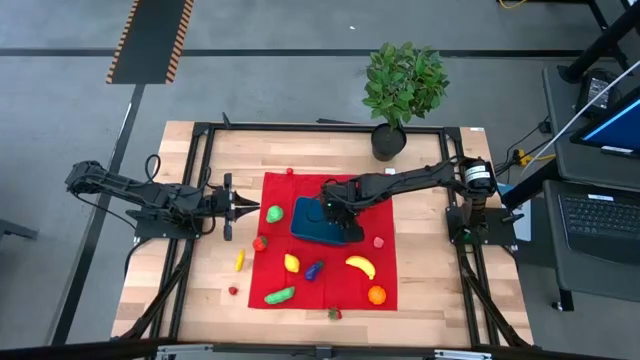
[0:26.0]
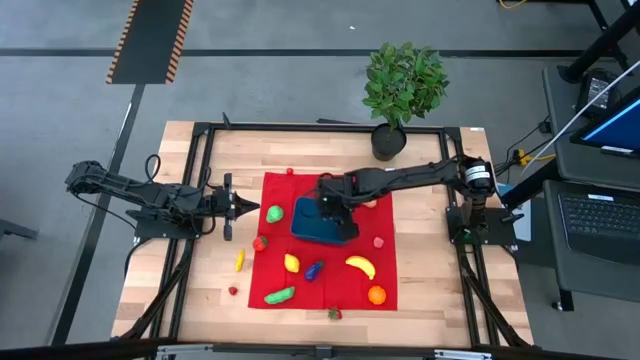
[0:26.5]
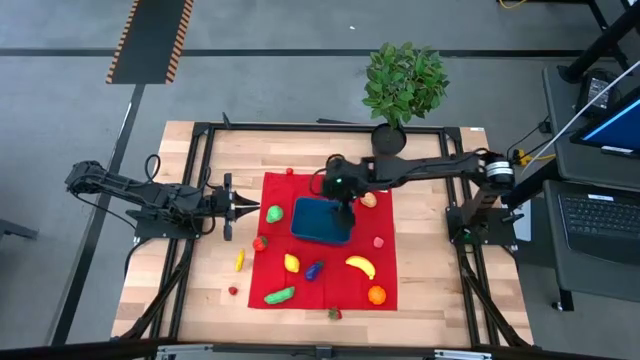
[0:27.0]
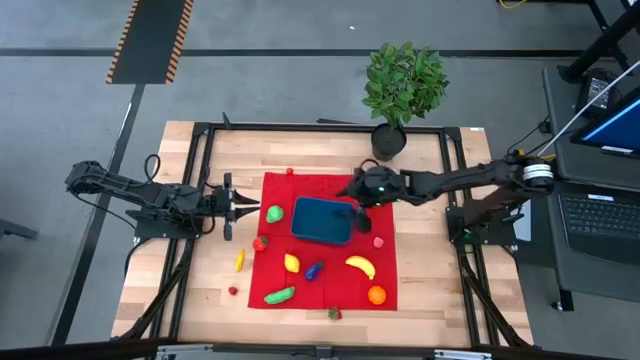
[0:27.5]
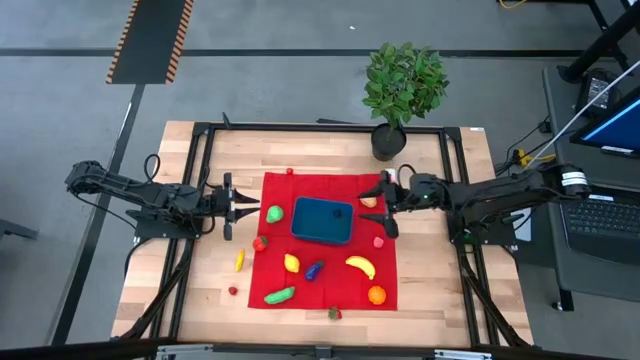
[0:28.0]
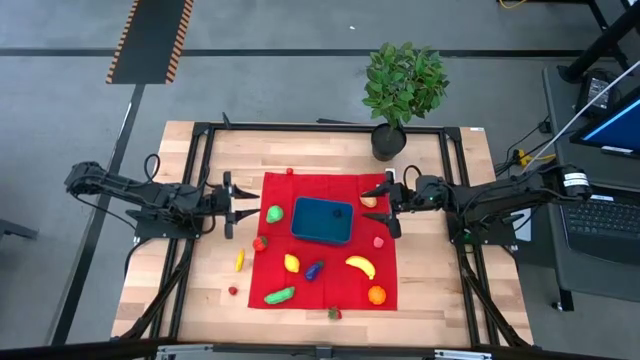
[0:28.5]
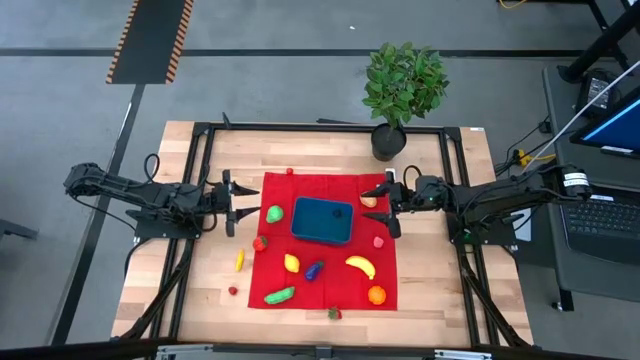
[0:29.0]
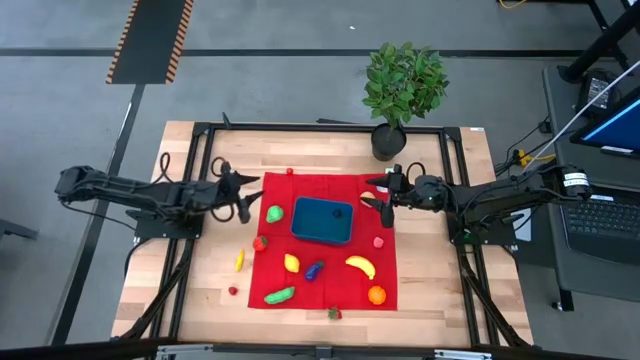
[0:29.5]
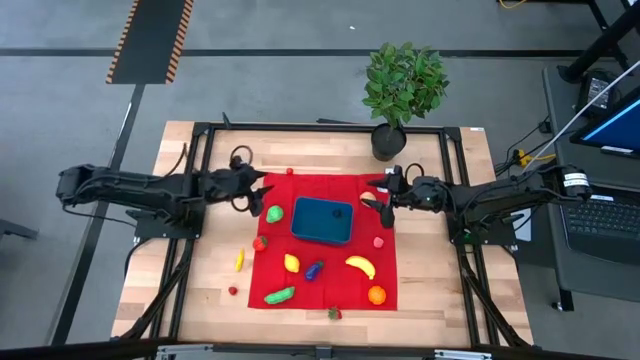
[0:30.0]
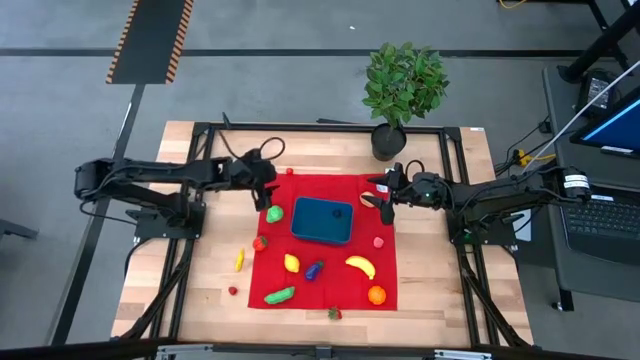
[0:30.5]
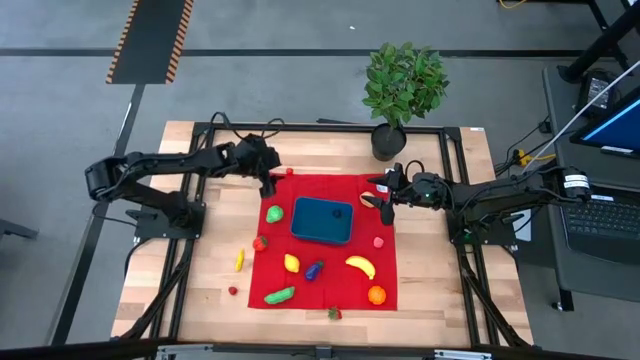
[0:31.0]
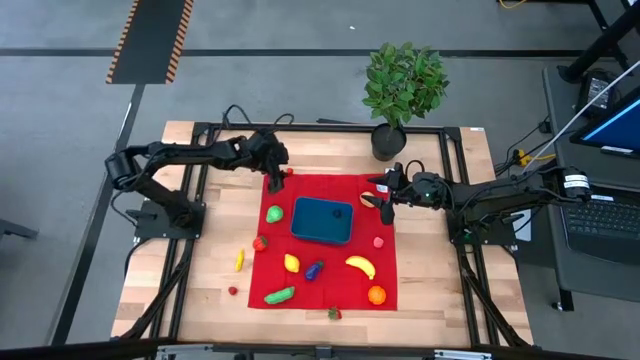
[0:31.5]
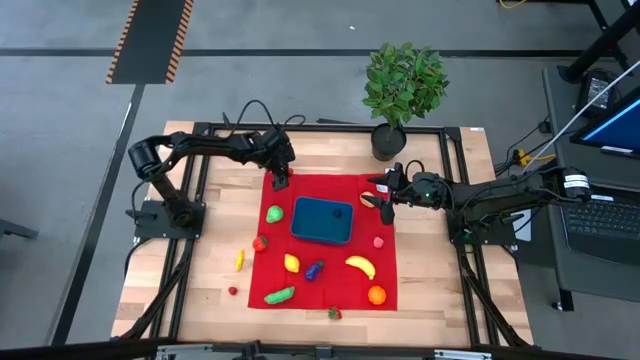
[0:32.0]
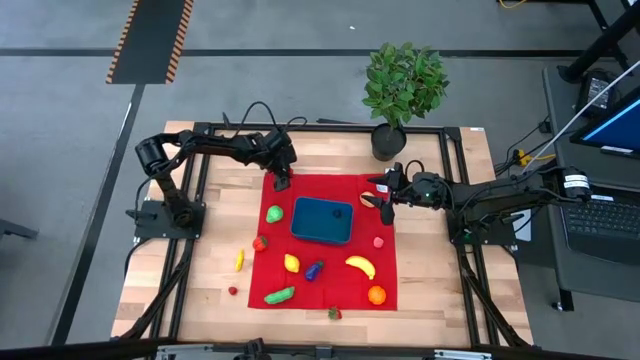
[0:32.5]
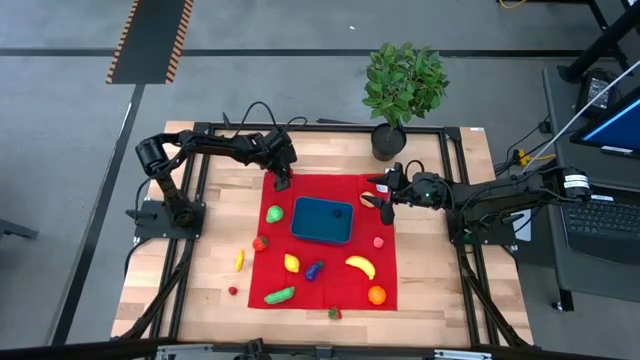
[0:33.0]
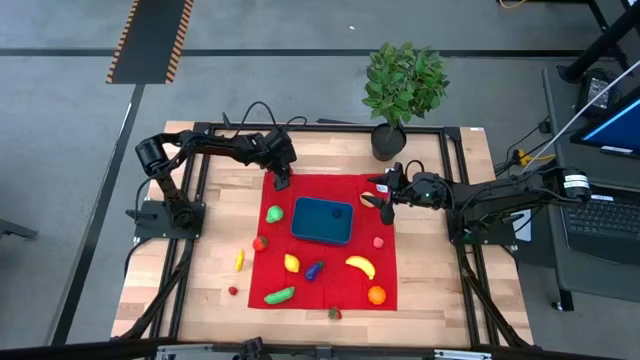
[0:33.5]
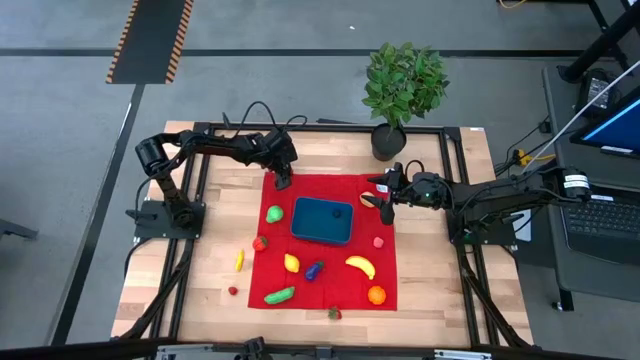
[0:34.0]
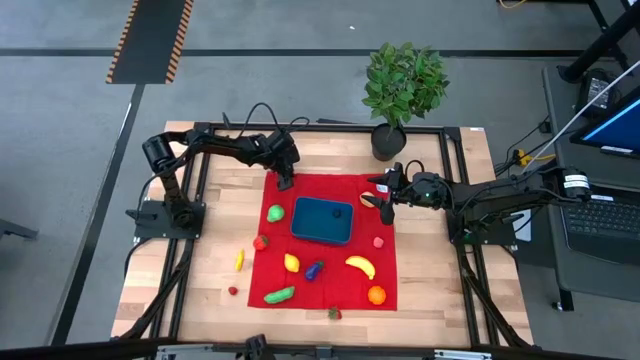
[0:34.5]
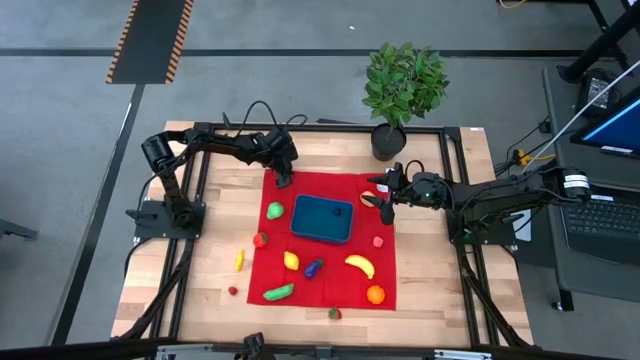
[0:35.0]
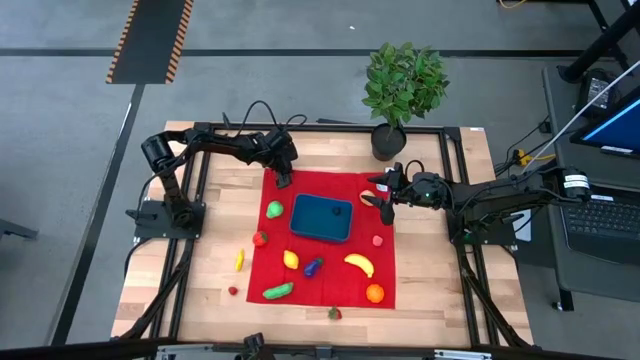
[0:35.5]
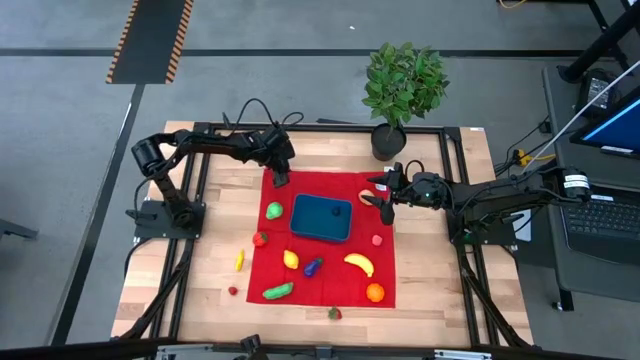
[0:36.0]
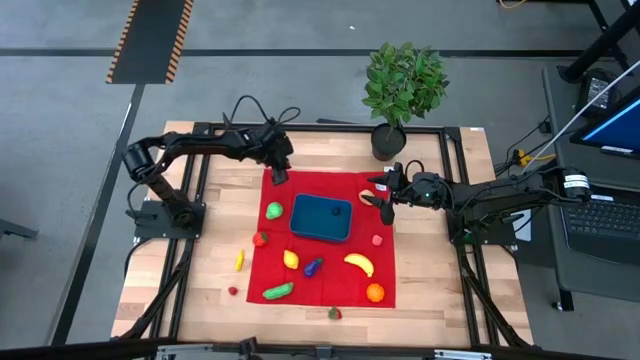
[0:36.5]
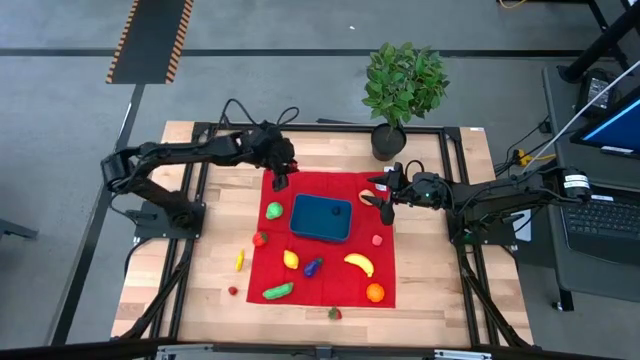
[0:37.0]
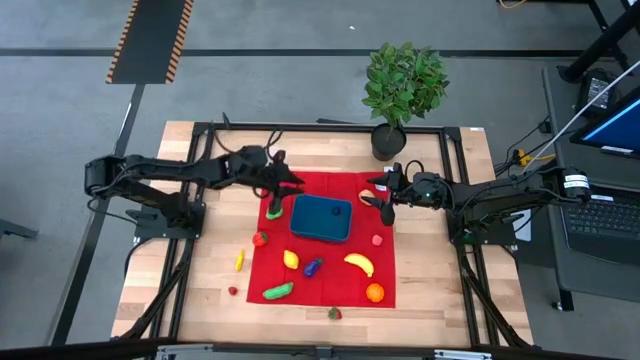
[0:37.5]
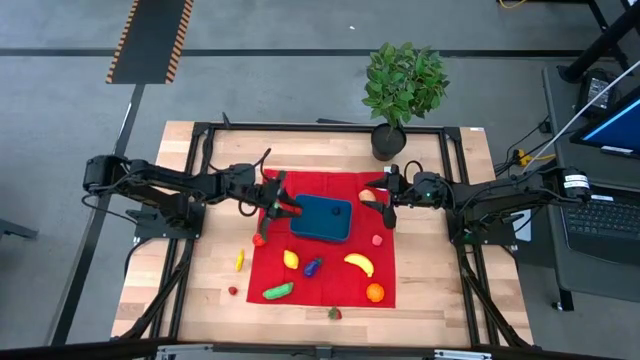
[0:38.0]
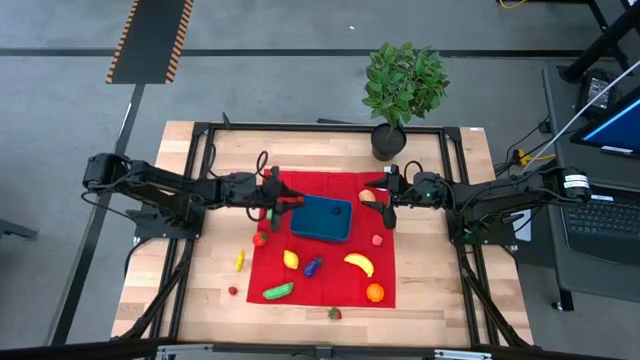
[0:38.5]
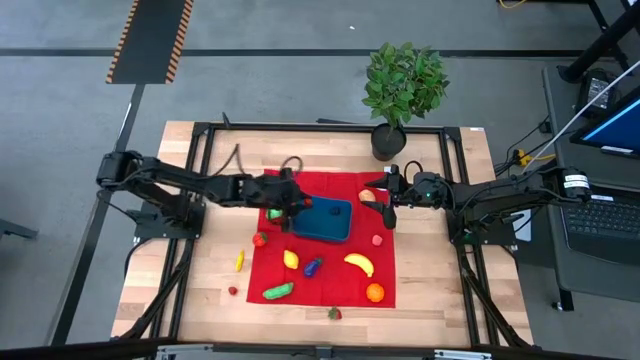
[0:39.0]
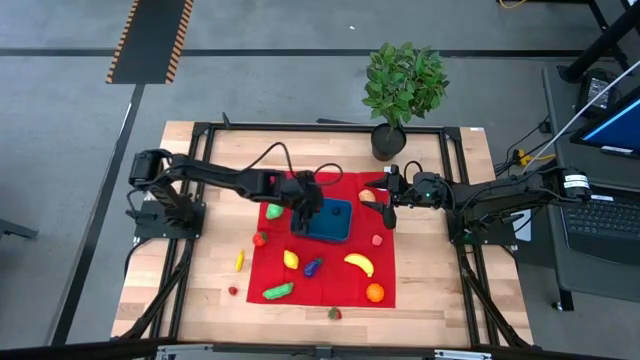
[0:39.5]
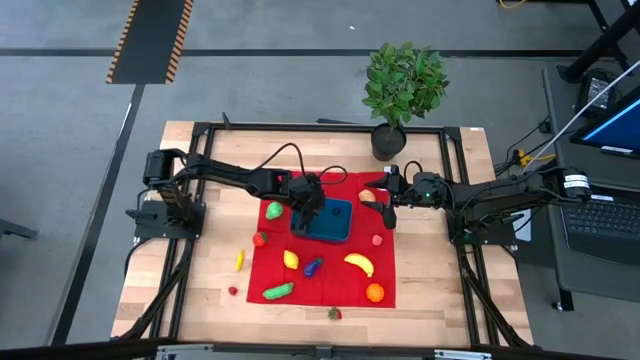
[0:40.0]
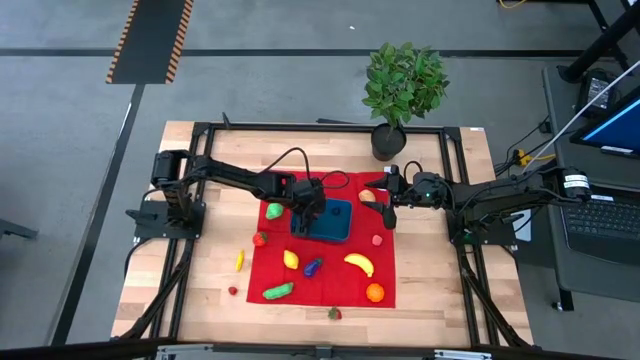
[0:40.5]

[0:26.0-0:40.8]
Task: Pick and placing Produce into tupperware
Put the red cherry into the blue bin

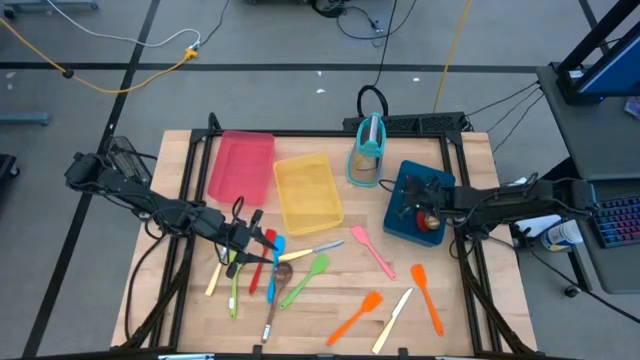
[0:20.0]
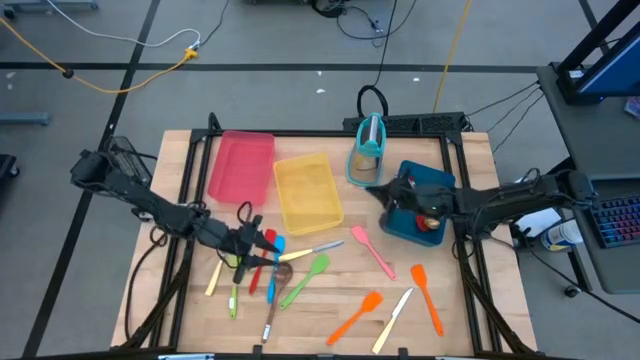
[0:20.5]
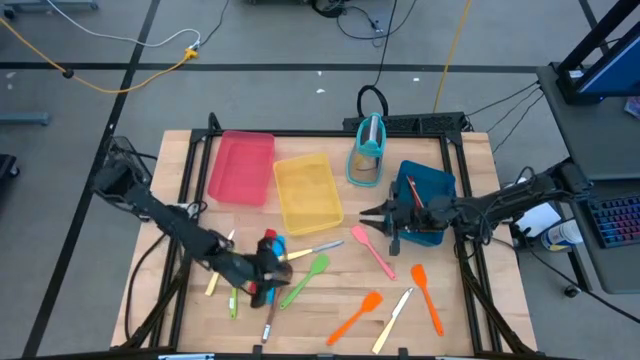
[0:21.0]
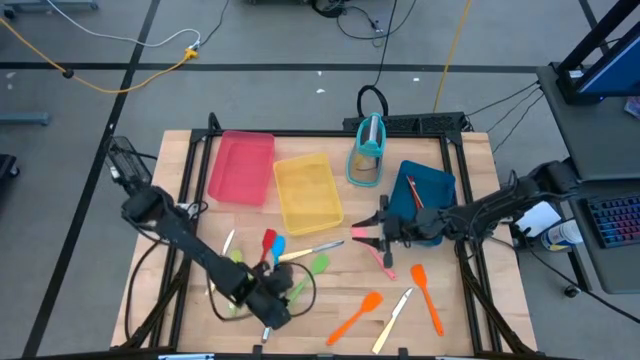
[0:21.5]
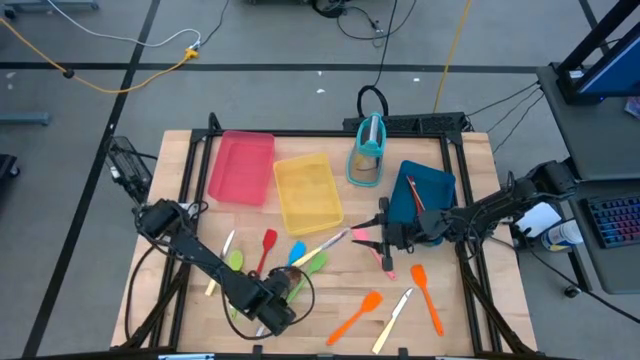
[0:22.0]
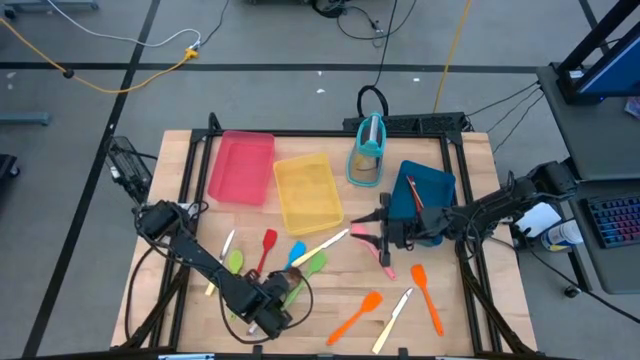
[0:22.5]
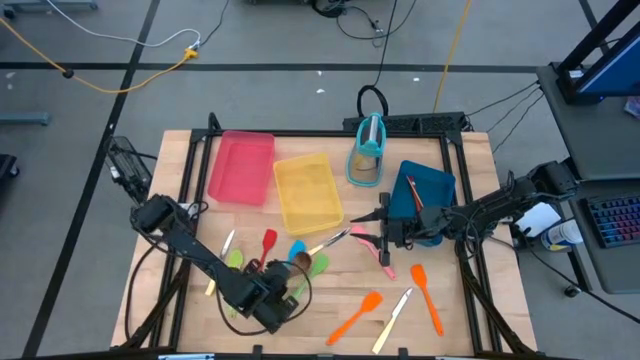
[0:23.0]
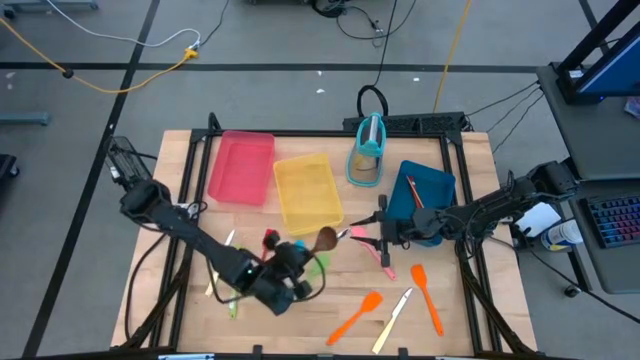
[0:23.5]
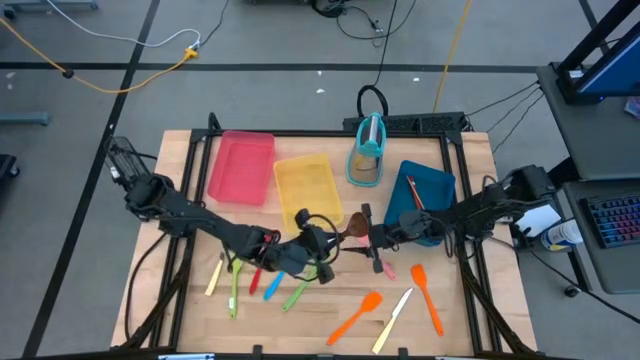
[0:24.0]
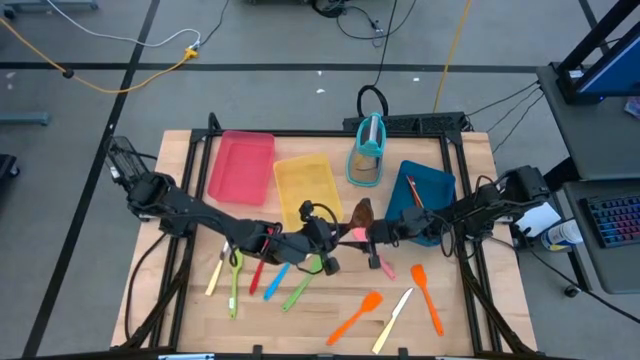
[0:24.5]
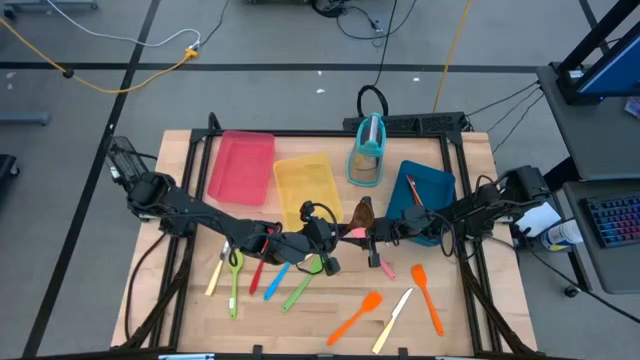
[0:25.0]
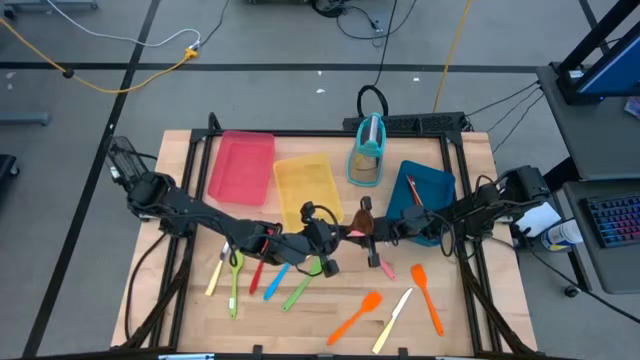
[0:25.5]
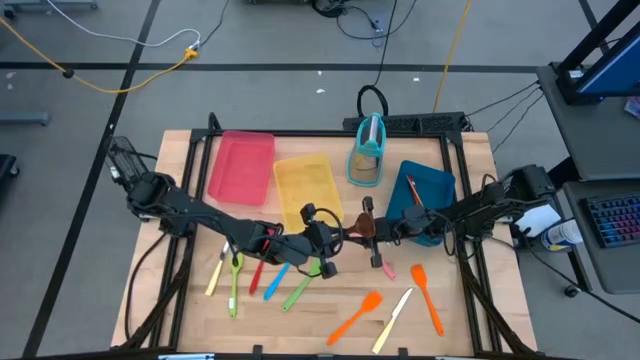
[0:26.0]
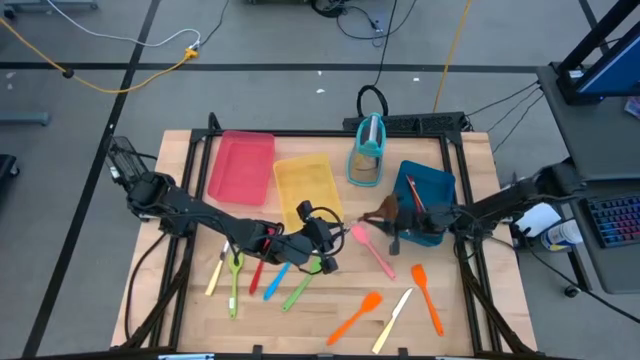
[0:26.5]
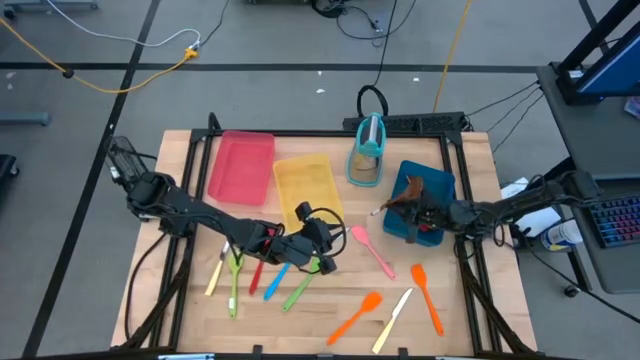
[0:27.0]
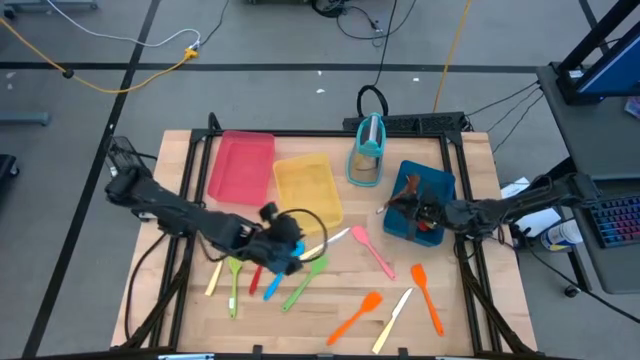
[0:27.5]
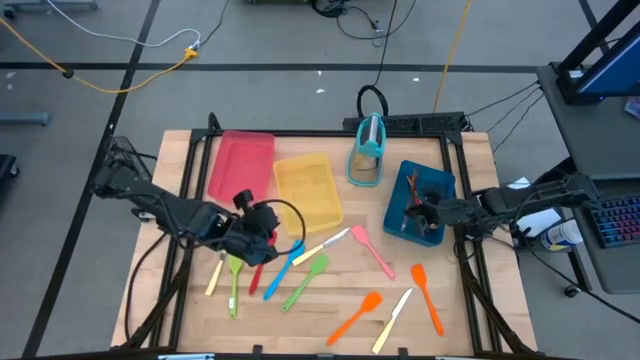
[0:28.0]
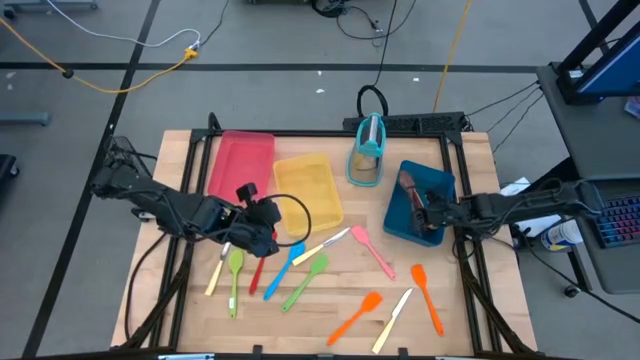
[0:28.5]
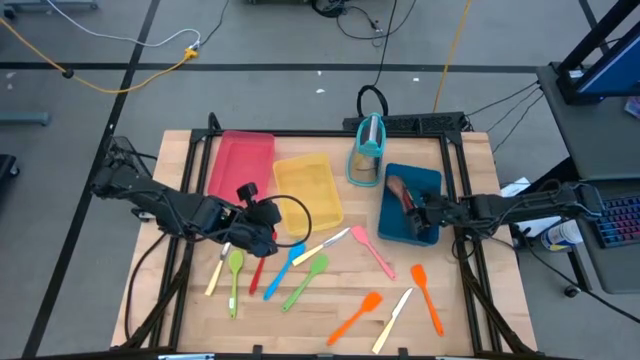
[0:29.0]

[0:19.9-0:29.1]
Task: Pick & Place Kitchen Items
Put the brown serving spoon into the blue bin
